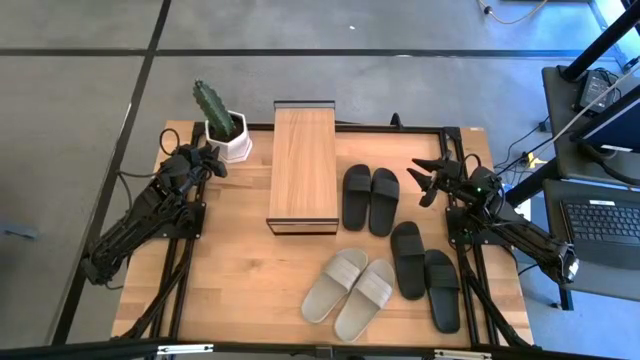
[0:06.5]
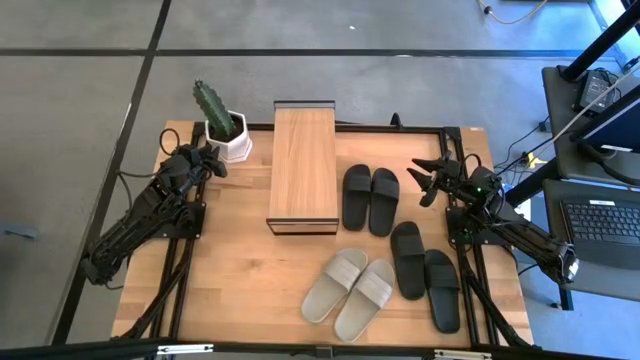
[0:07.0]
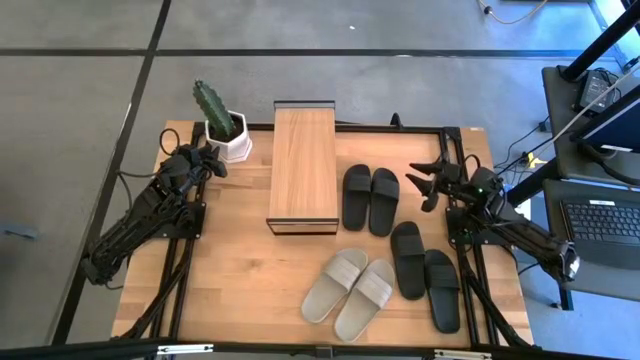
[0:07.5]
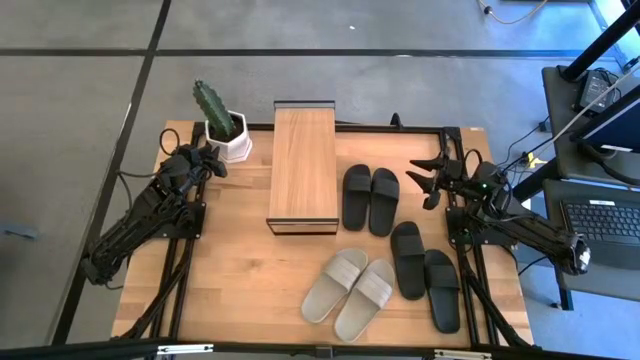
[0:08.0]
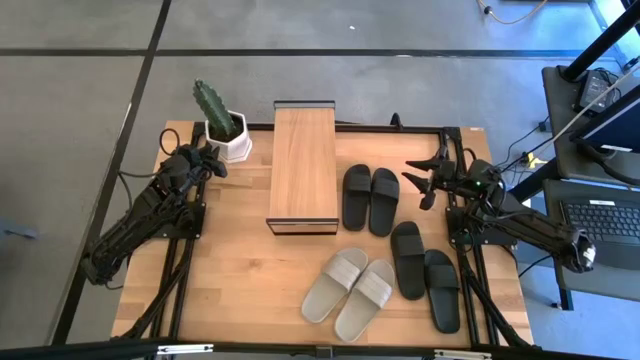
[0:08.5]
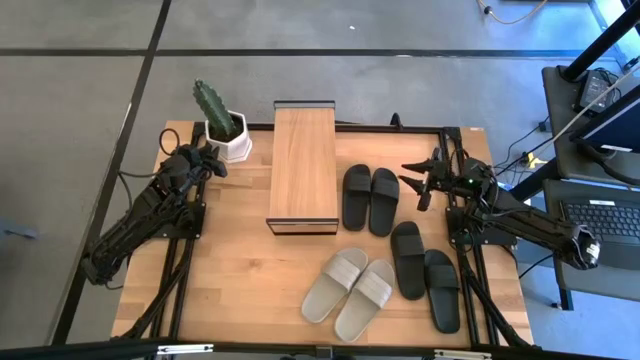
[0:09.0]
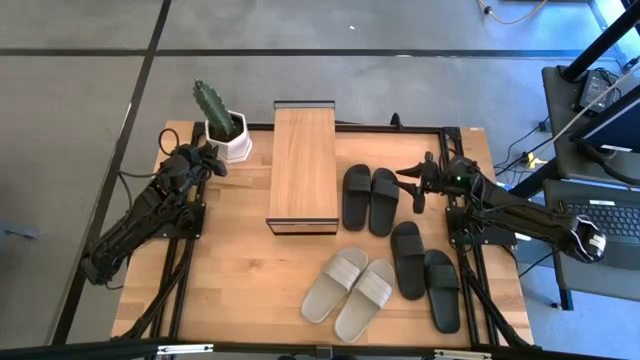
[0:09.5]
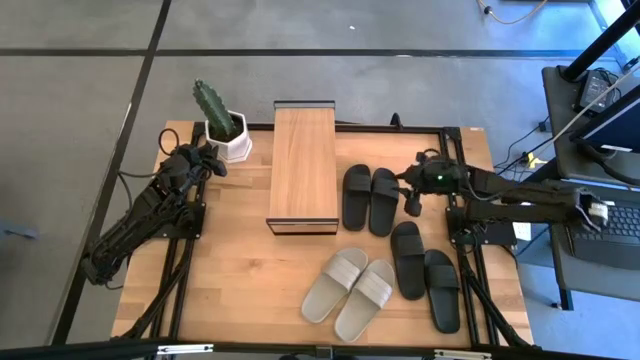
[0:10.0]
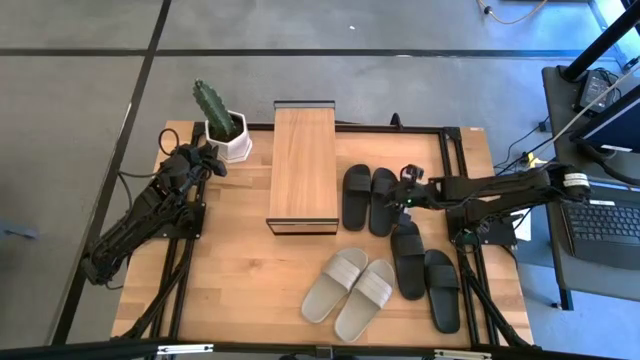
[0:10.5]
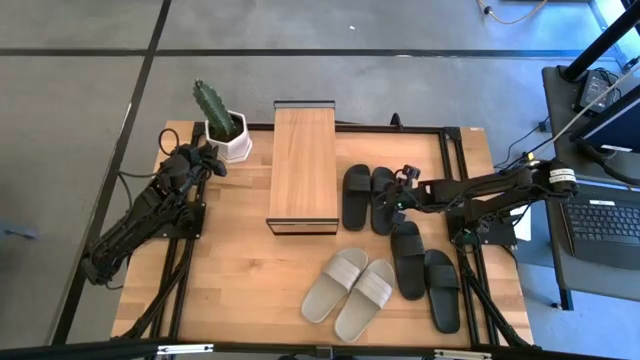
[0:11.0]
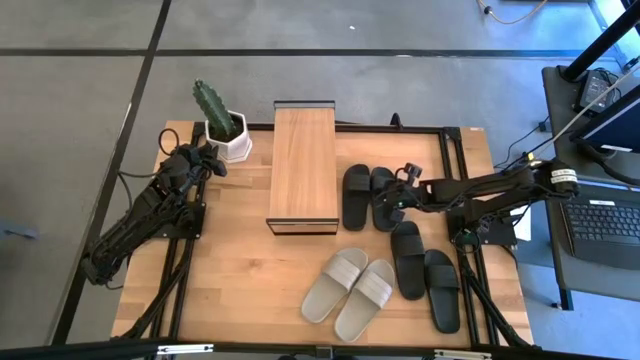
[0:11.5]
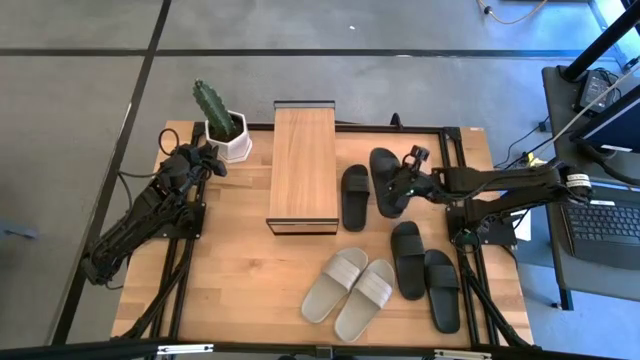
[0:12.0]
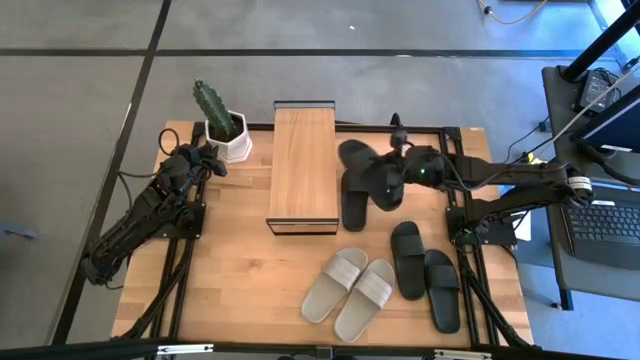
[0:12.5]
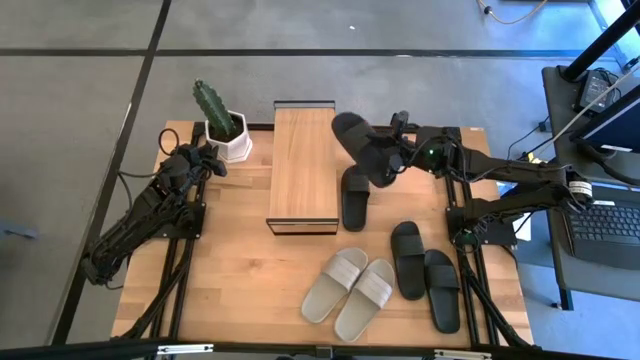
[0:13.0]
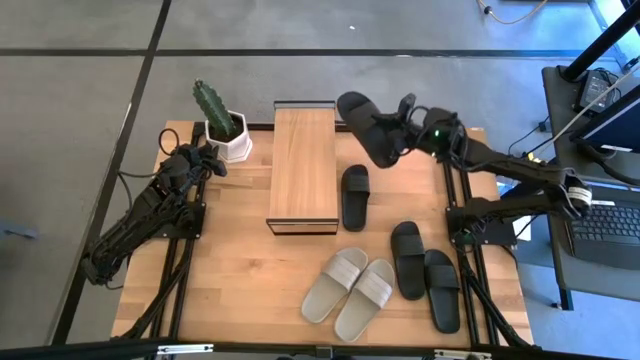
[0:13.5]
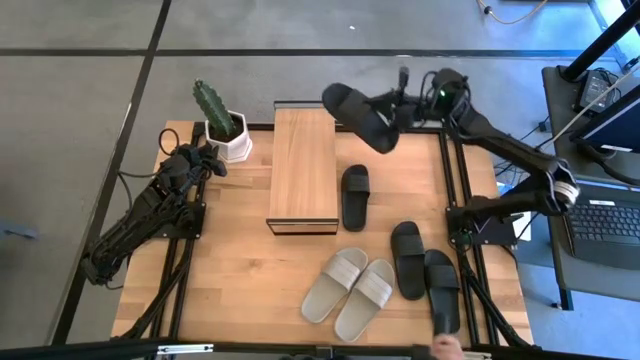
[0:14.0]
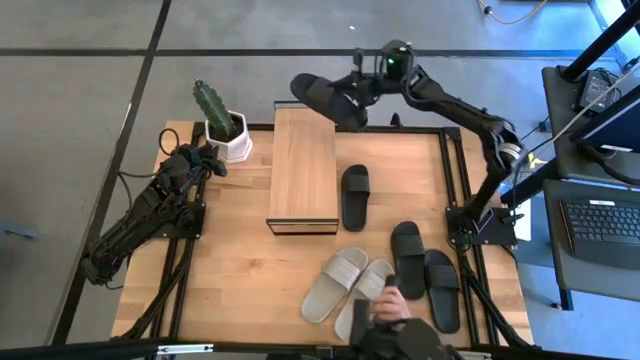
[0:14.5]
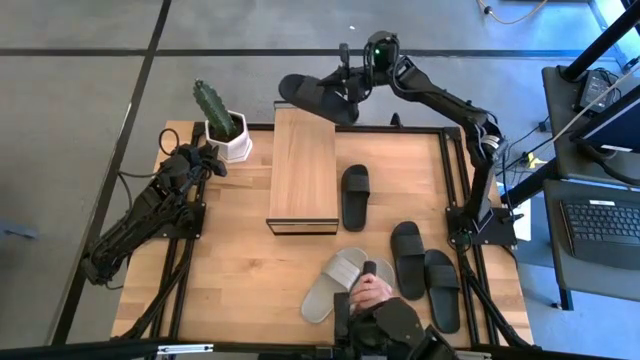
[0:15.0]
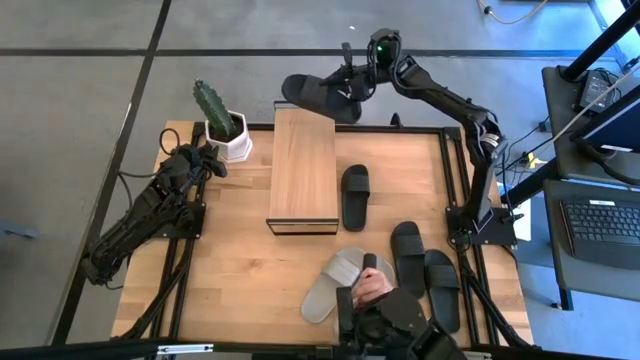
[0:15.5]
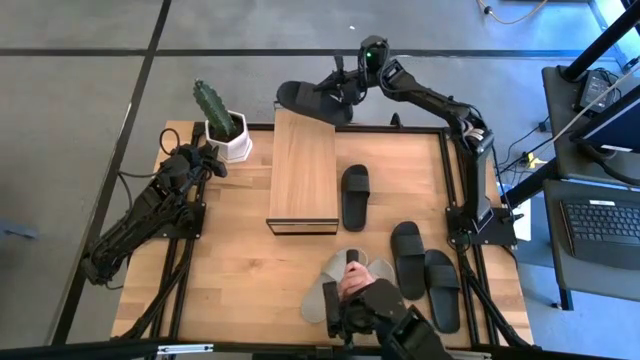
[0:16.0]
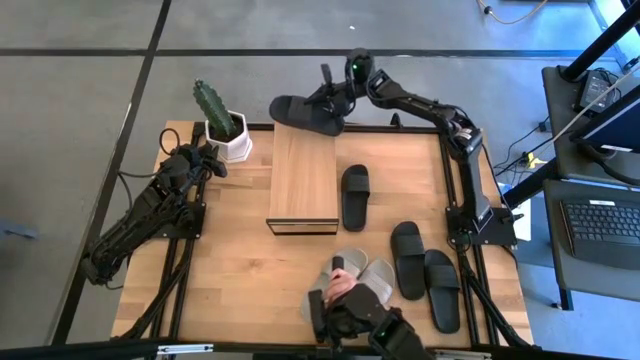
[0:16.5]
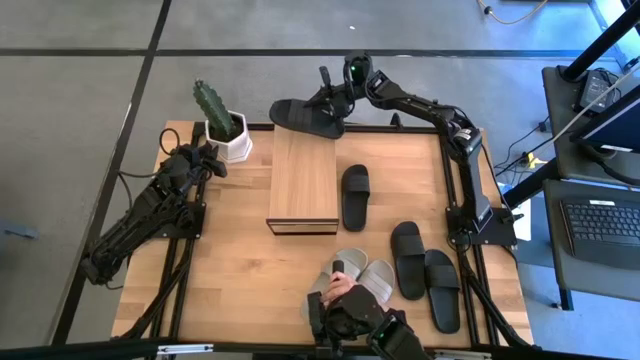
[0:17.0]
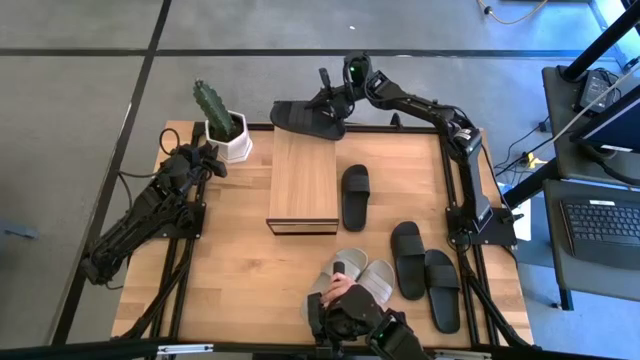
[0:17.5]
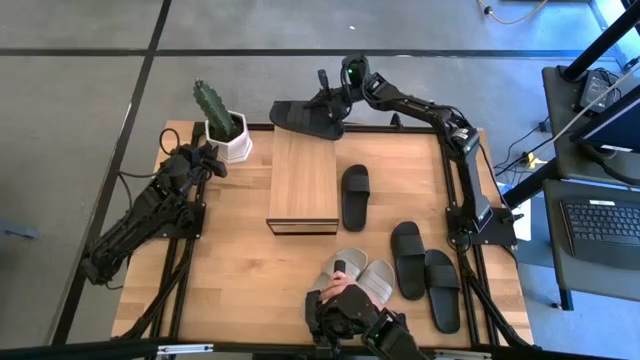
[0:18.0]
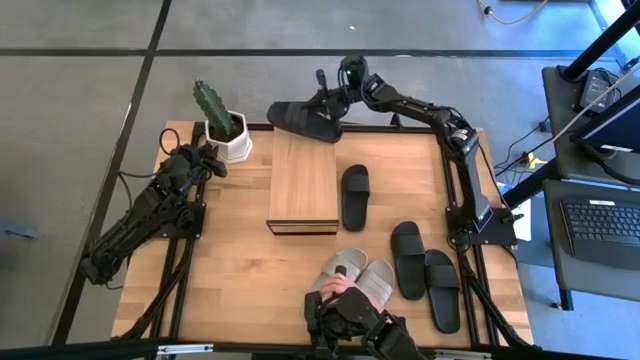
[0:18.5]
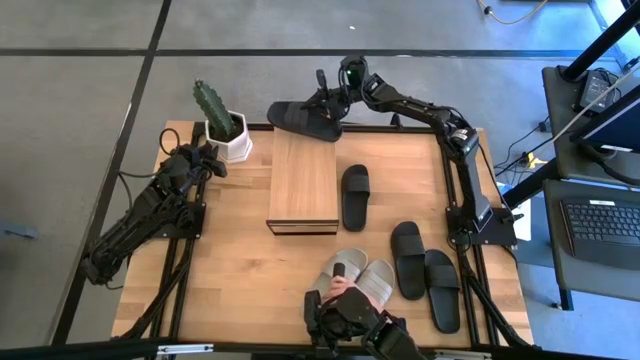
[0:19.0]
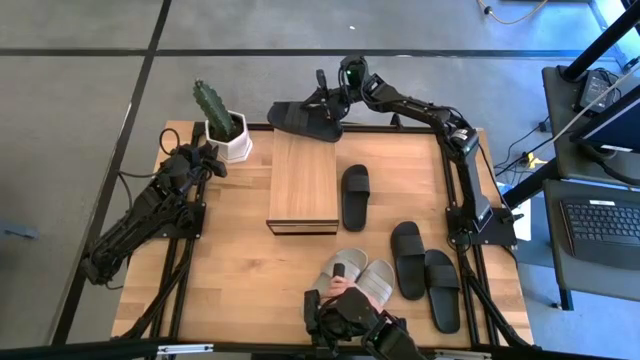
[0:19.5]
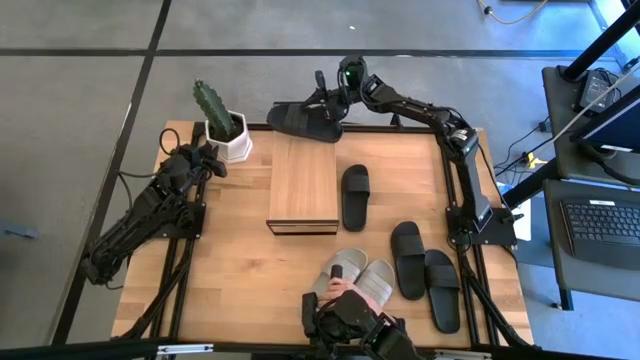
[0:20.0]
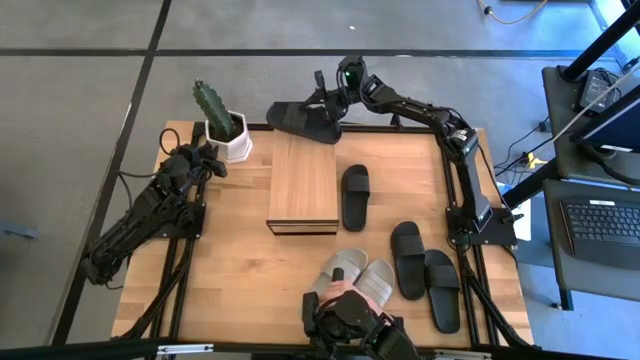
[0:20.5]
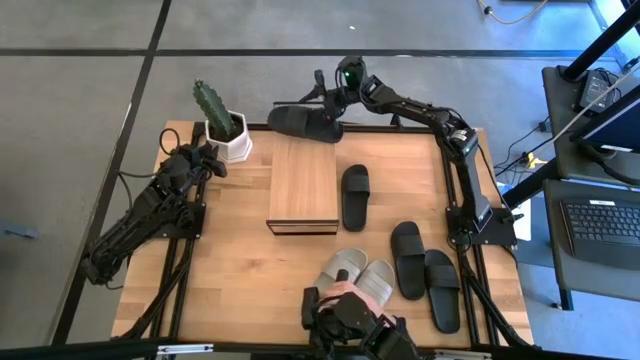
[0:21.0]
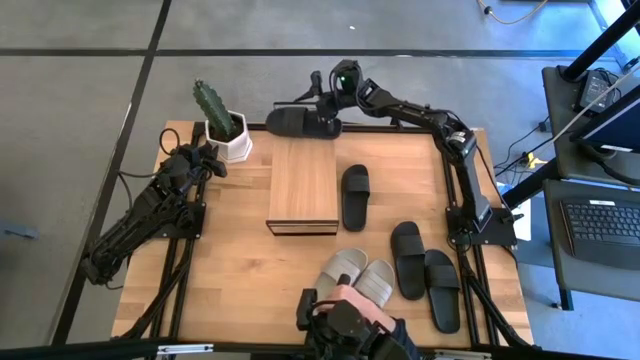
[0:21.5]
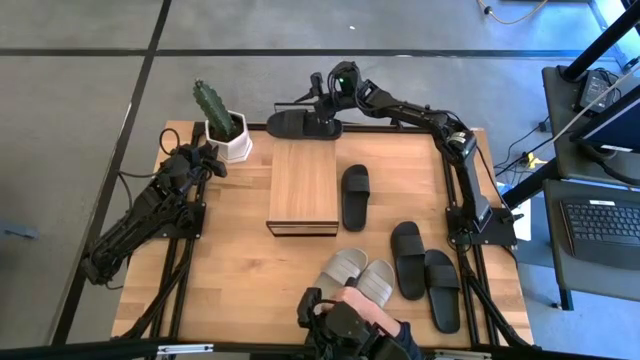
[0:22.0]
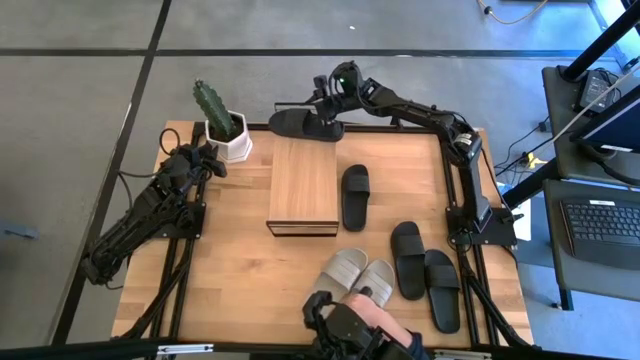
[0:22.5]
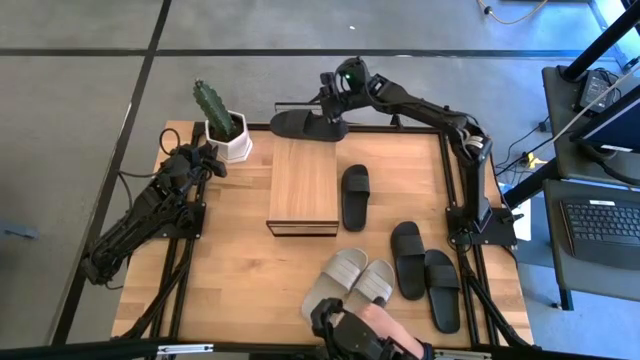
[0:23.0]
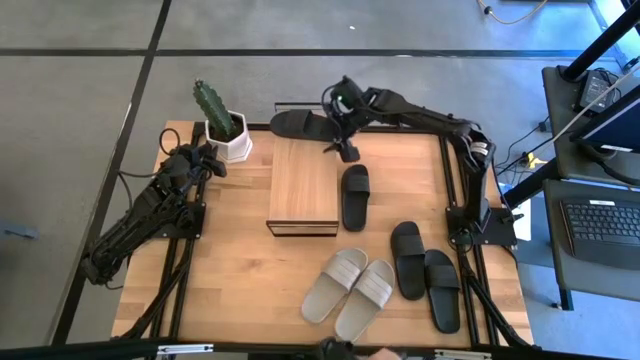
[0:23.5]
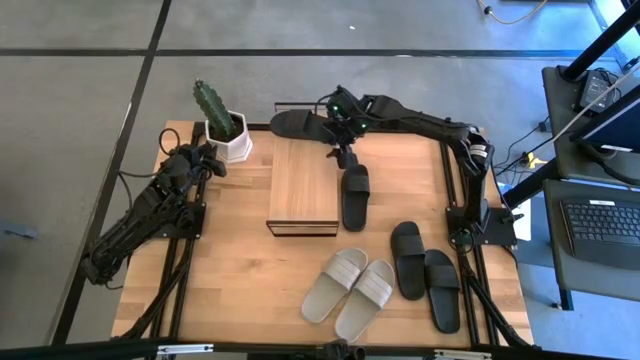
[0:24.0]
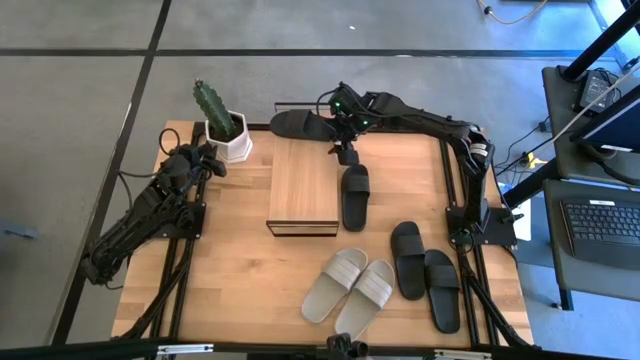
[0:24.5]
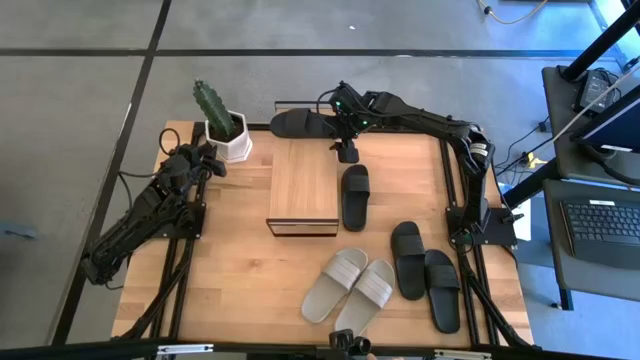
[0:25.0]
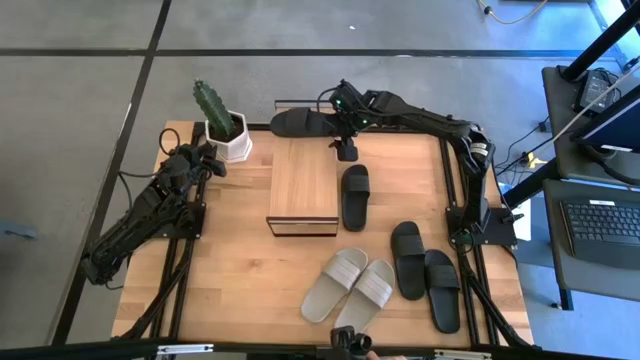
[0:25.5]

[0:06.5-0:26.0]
Task: Pick and place slides into the shelf
Put the top right black slide on the shelf
